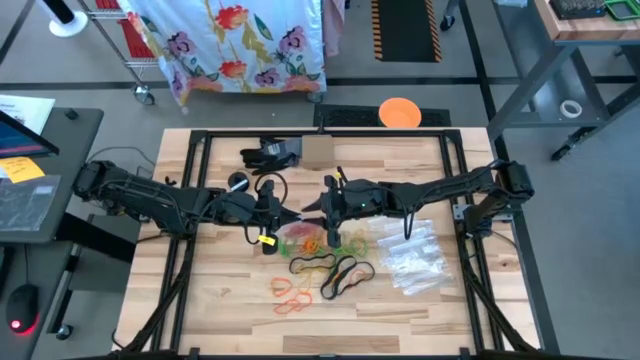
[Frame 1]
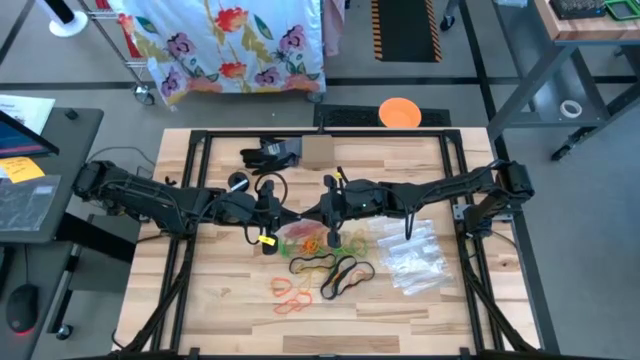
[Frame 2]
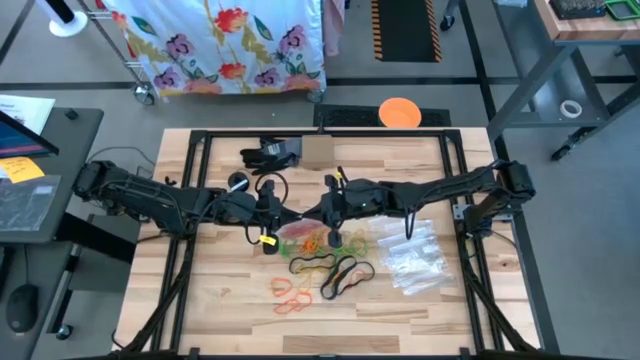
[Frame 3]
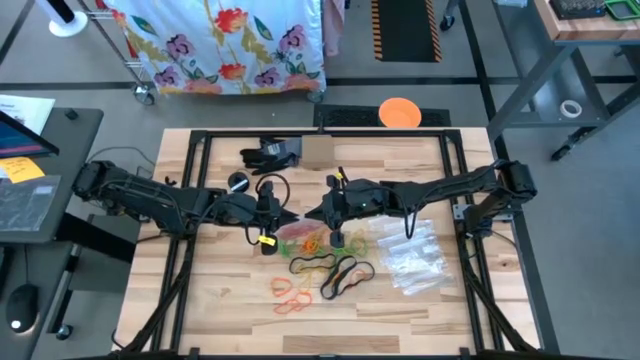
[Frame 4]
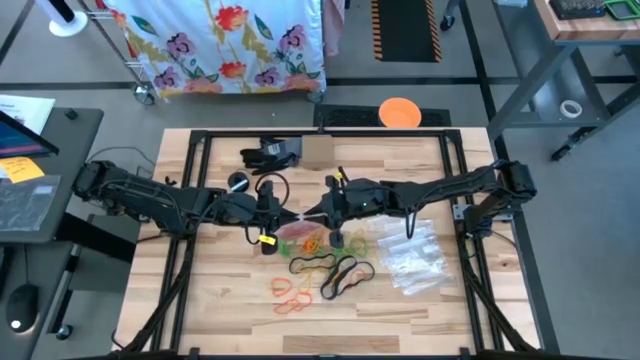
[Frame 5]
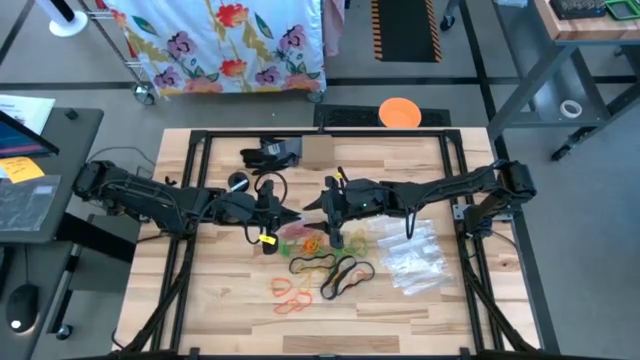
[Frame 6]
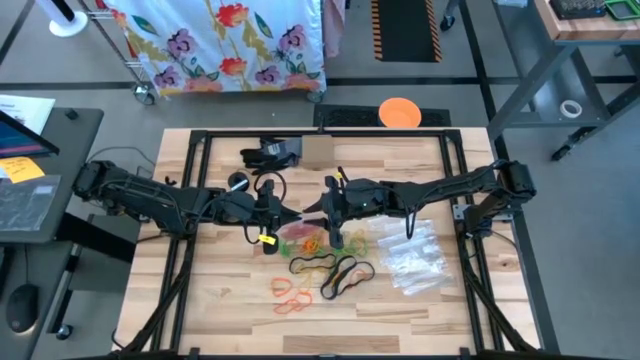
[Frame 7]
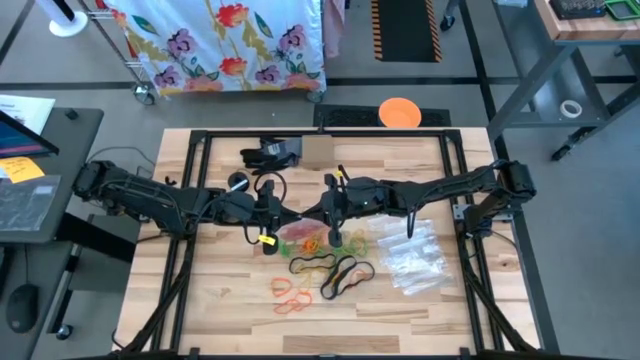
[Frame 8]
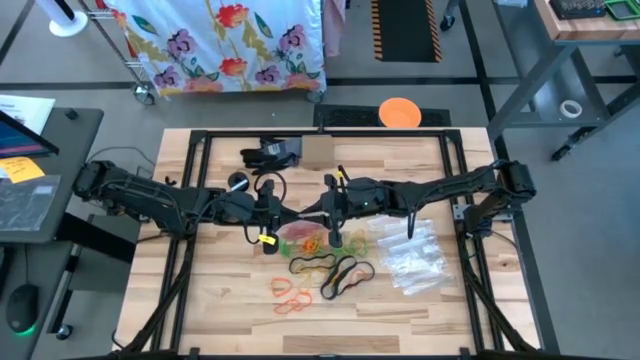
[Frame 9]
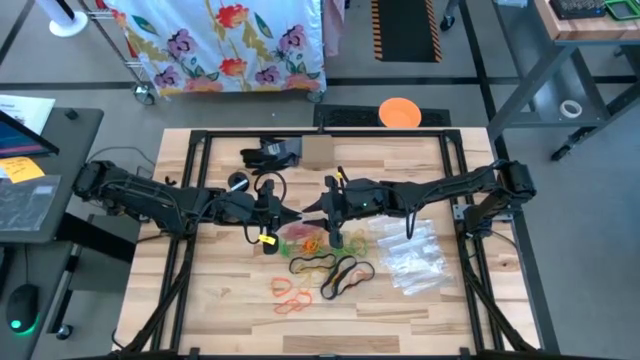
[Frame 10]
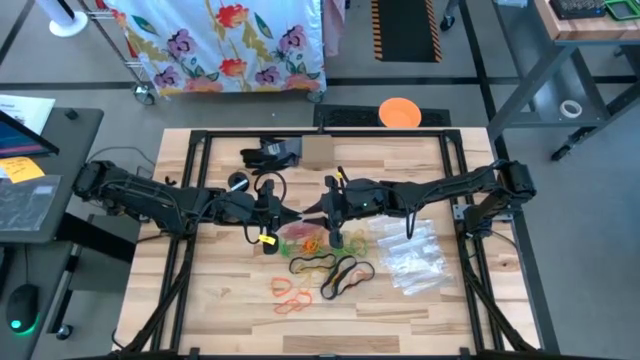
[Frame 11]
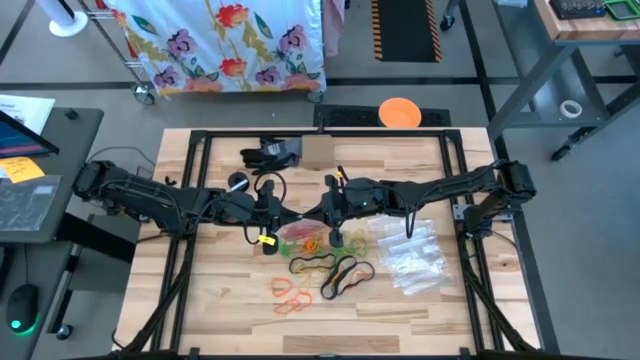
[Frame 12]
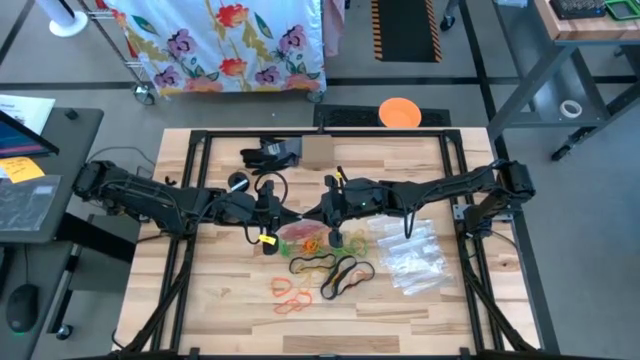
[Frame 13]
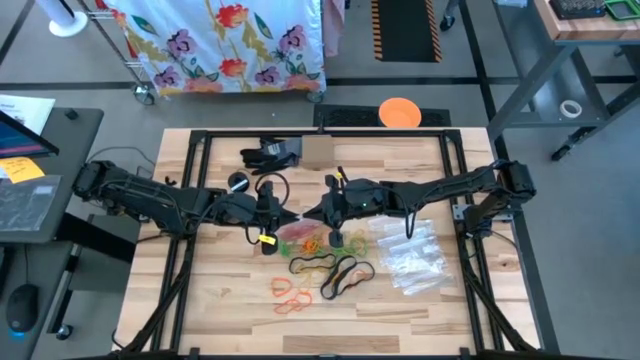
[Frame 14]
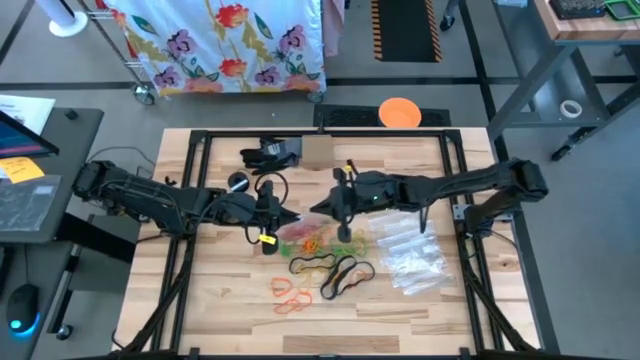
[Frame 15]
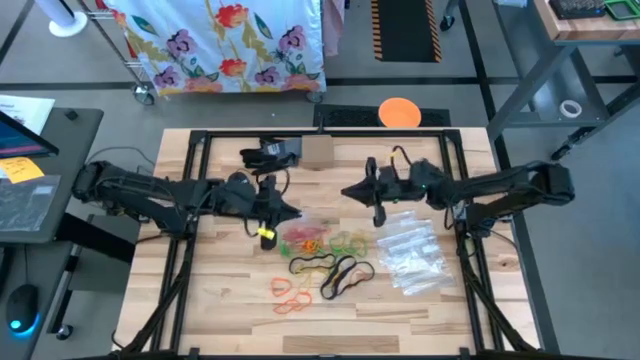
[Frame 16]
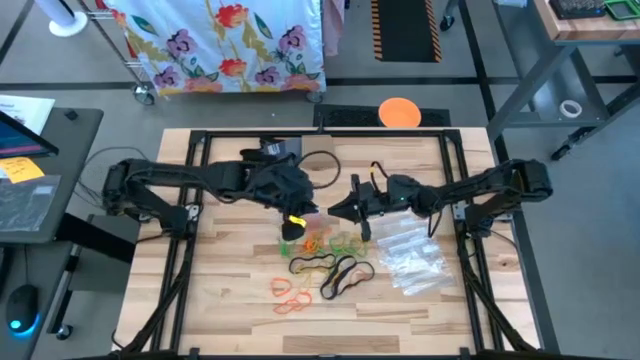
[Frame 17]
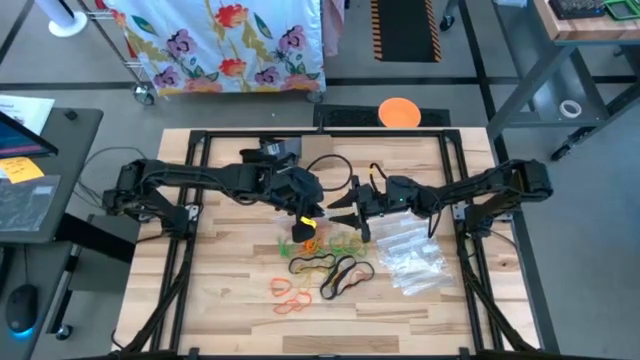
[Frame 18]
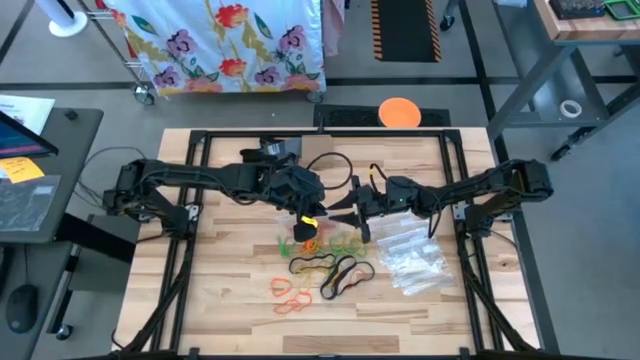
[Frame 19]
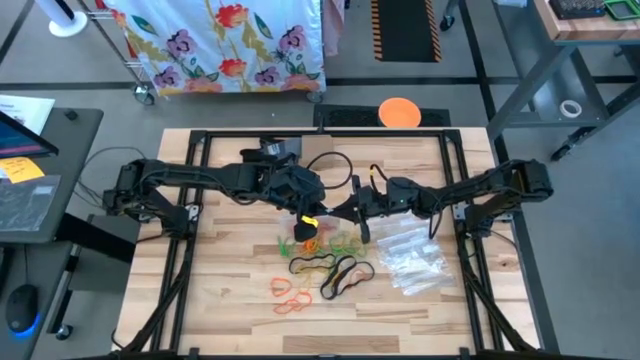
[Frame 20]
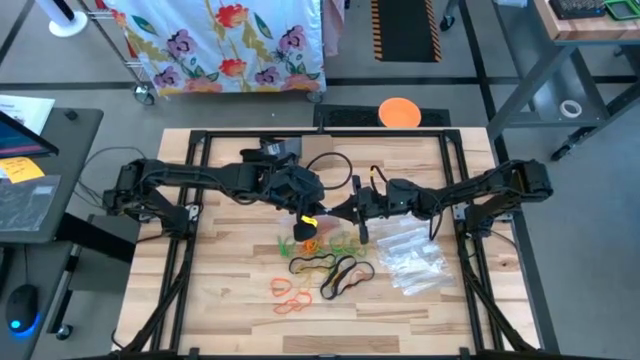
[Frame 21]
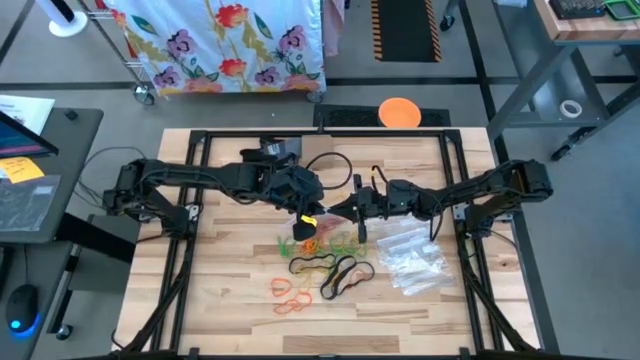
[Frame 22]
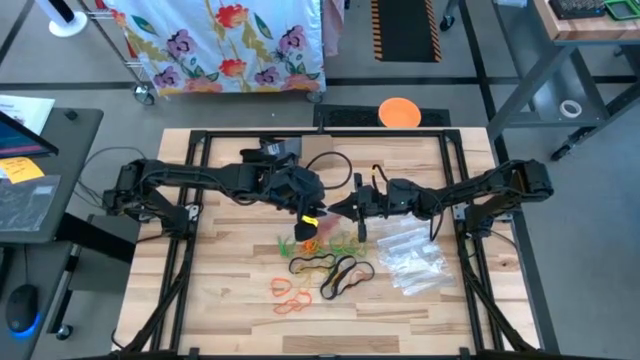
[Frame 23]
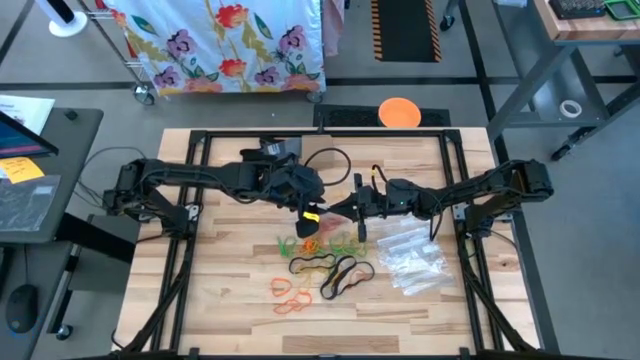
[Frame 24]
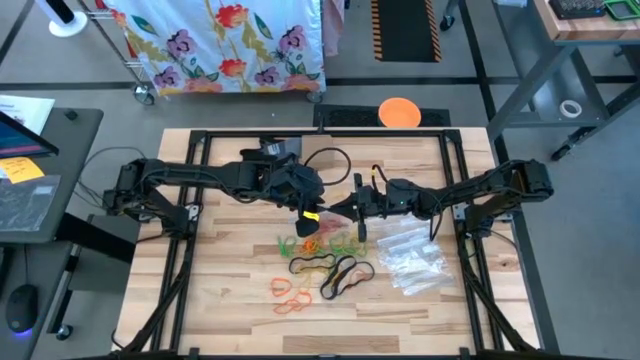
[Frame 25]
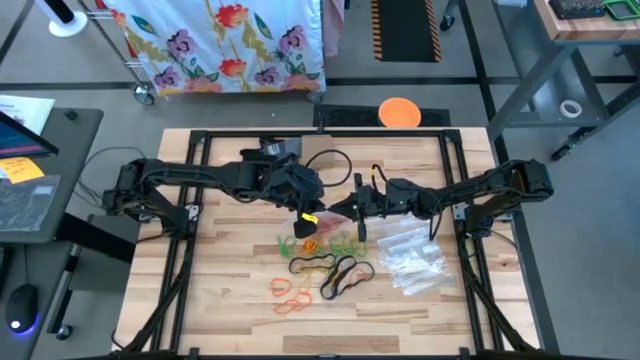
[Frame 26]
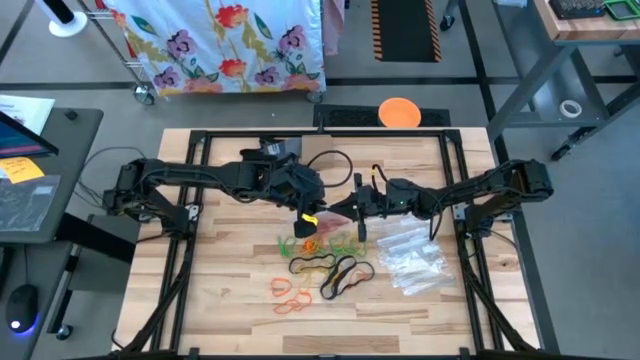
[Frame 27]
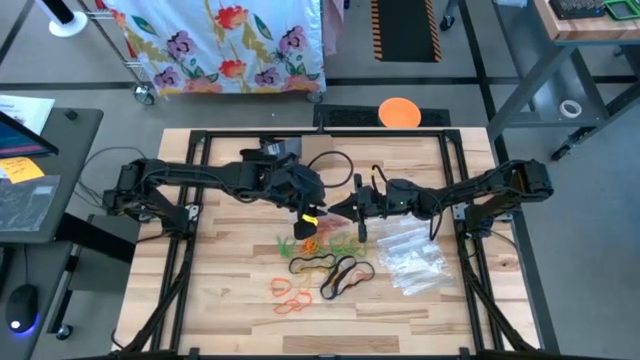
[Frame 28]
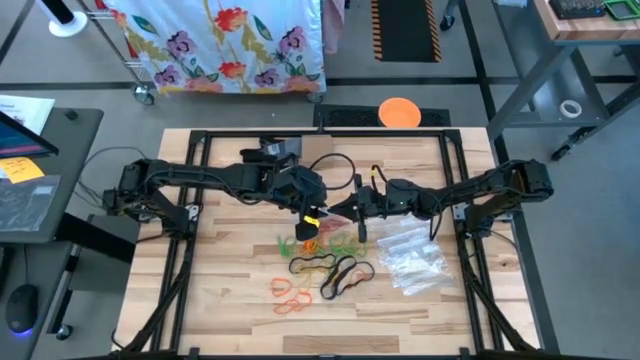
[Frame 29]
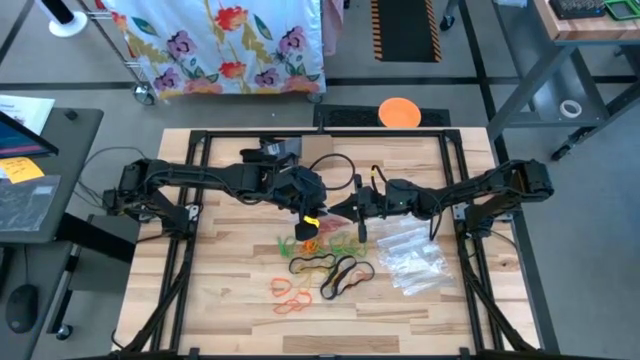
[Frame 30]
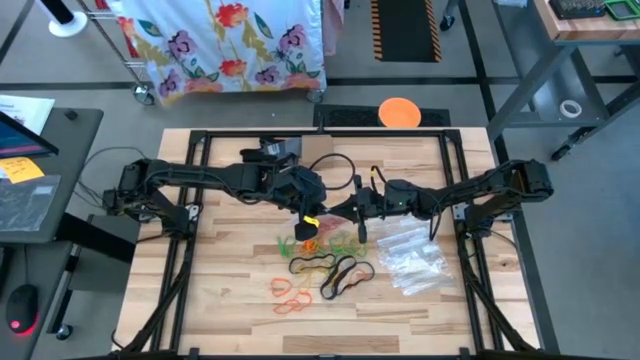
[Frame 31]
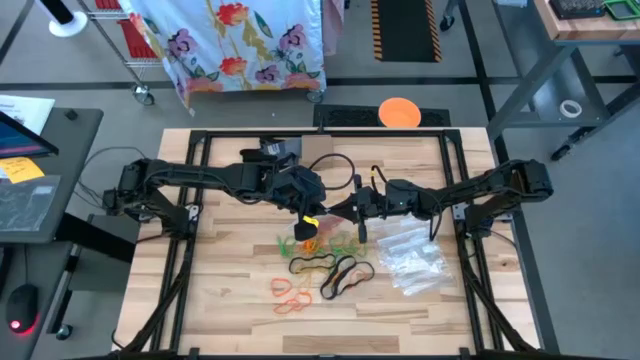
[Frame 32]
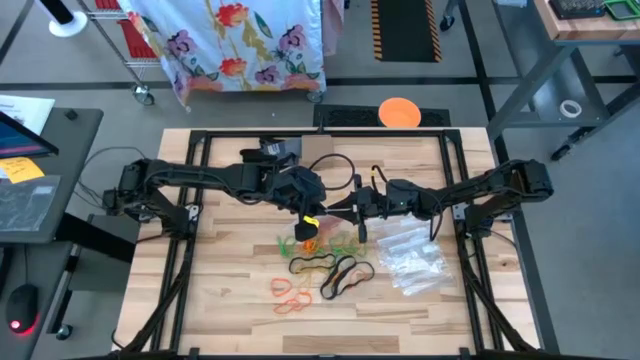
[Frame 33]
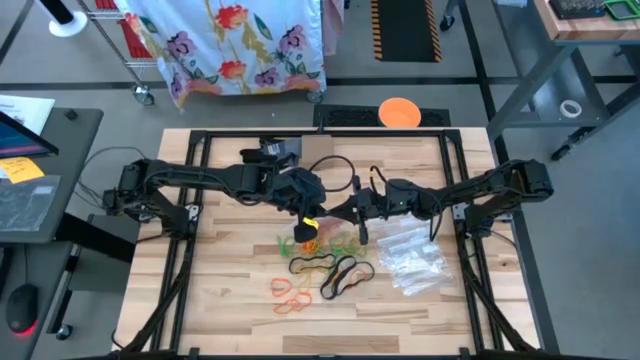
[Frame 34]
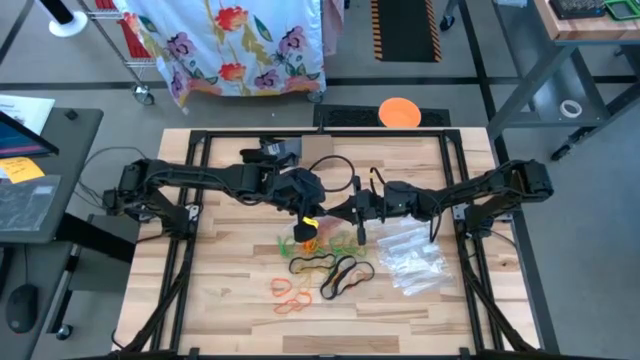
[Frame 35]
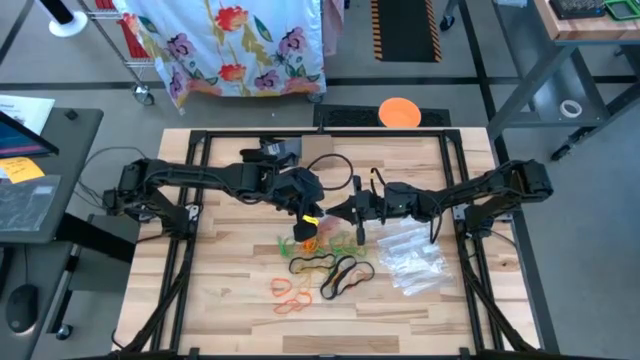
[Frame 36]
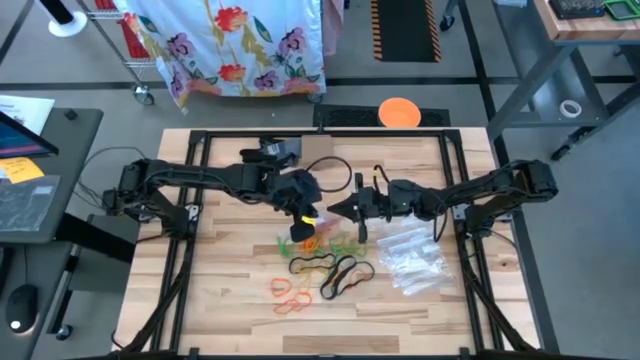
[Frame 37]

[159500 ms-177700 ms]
Task: Sort rubber bands
Close the transparent zip bag

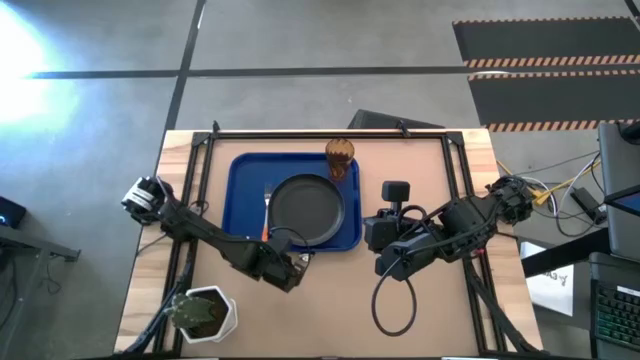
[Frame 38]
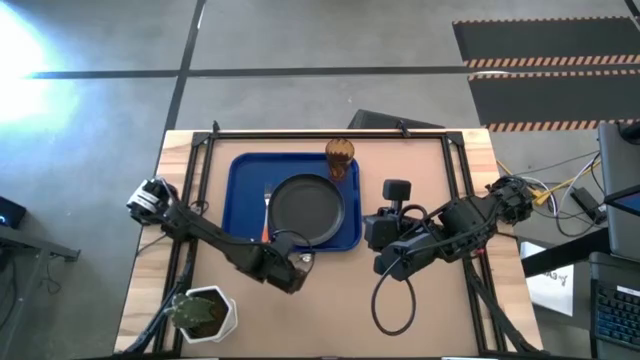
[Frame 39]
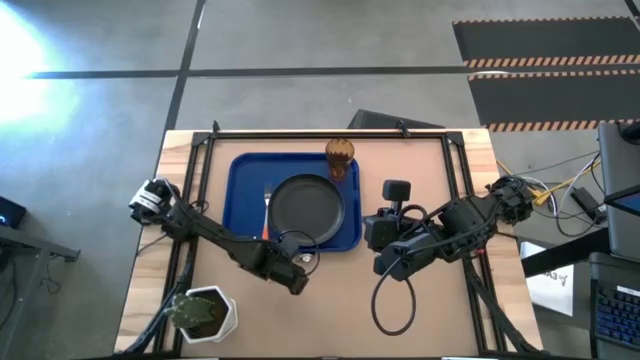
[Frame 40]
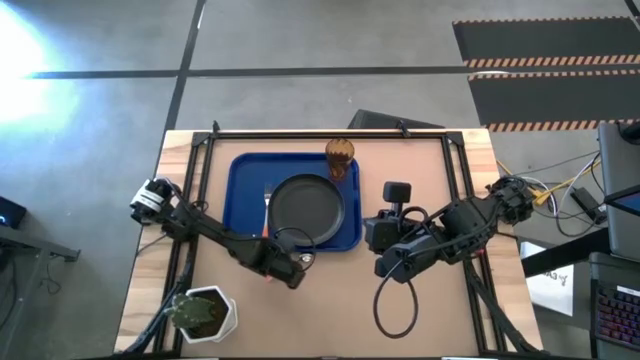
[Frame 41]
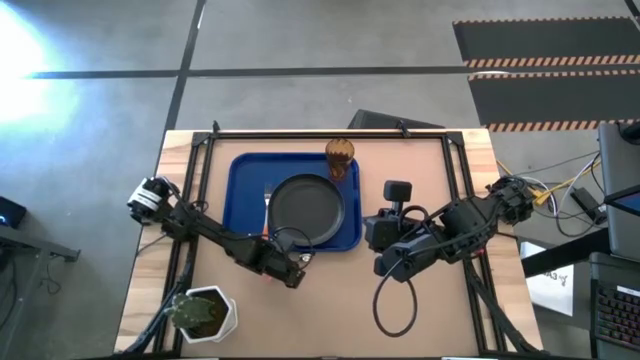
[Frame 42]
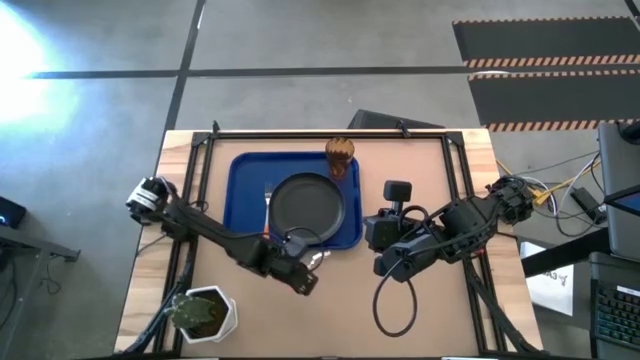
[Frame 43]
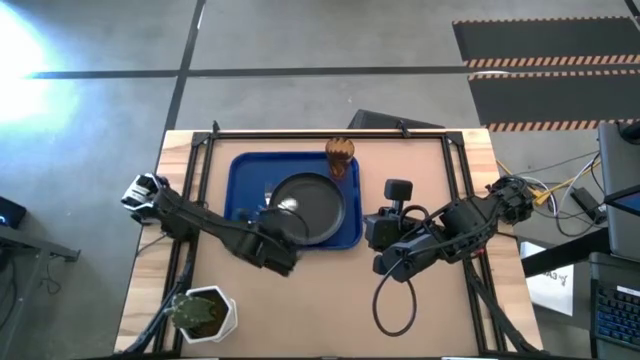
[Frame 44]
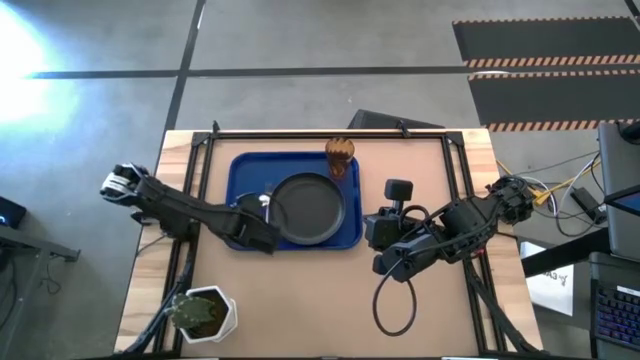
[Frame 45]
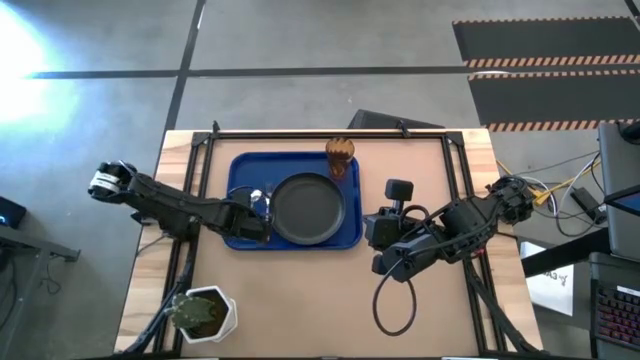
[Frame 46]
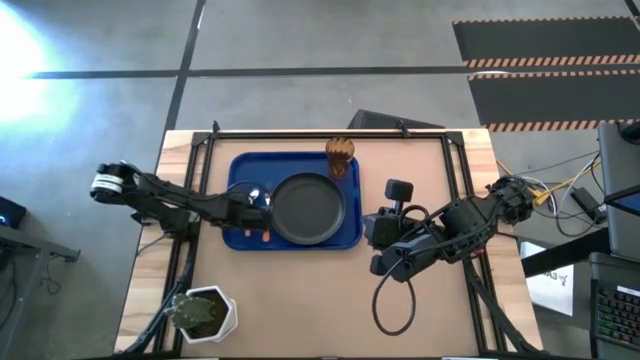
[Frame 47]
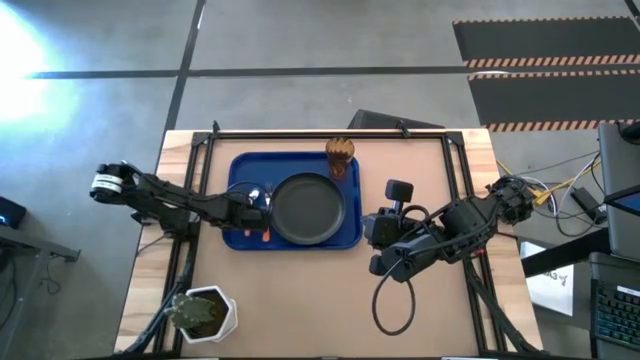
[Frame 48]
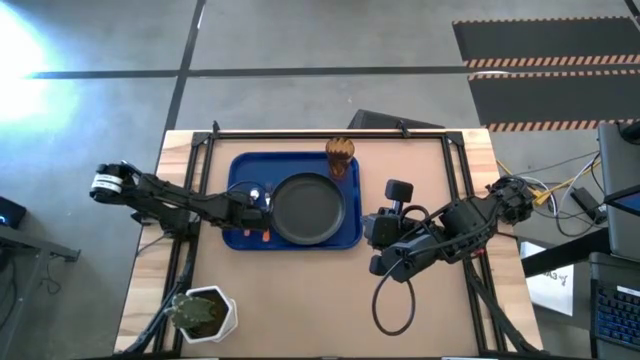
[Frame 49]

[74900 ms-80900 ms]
Task: Pick and place plate/cup/fork/spoon on tray
Put the orange spoon beside the fork on the blue tray
